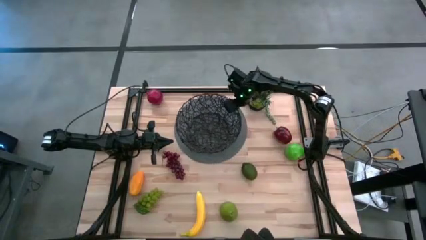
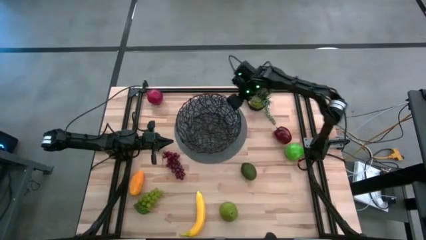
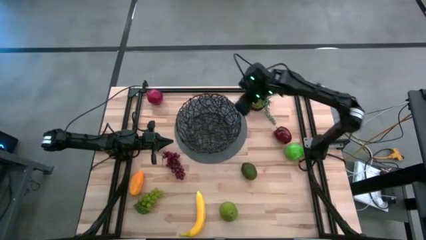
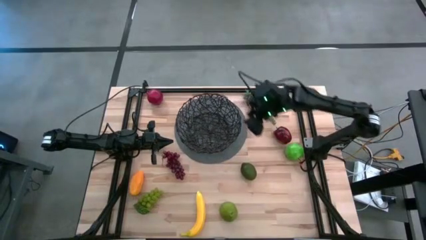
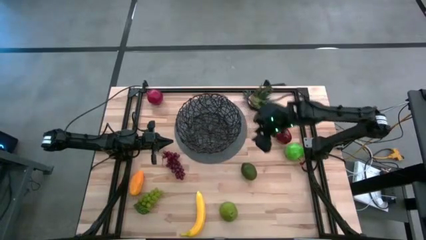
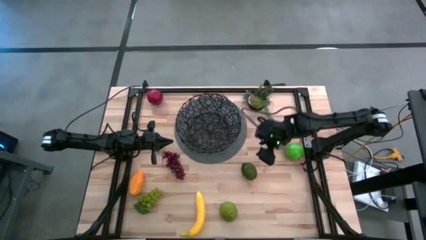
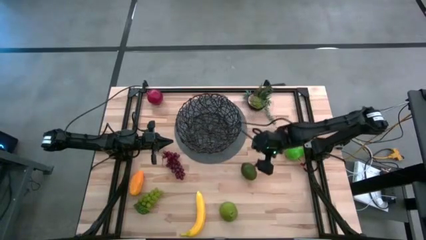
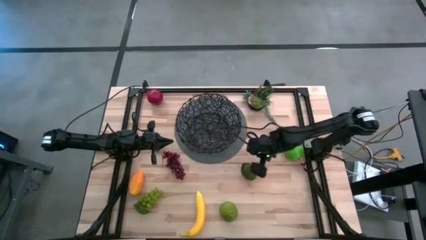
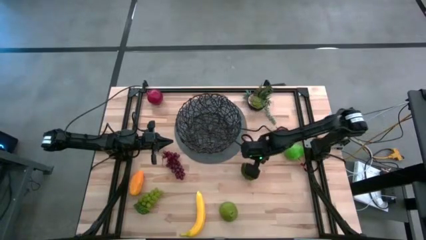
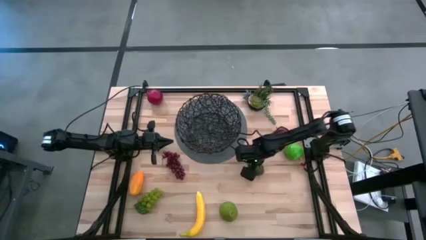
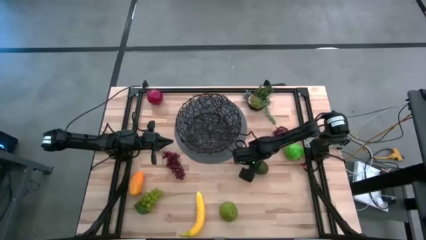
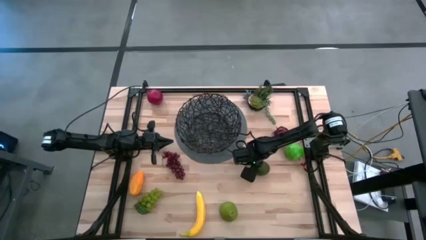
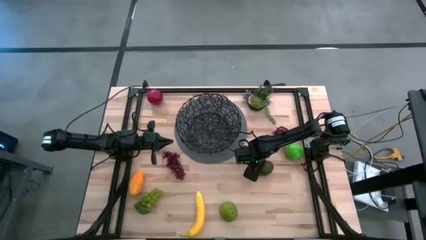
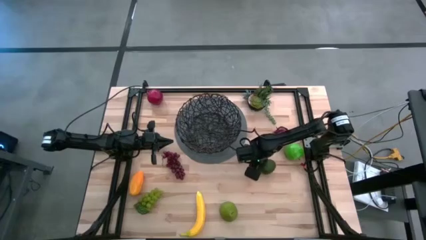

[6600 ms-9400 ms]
Task: Build produce basket
Put the green lime into the black basket

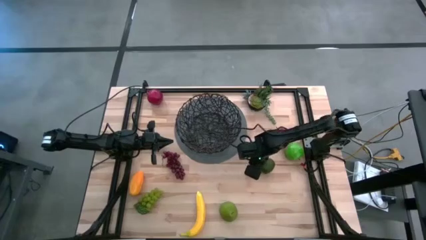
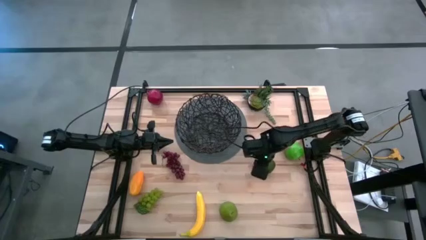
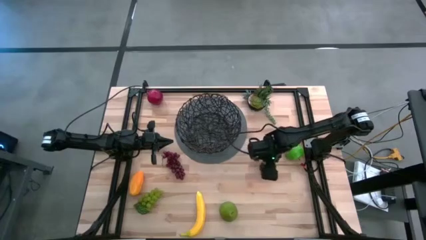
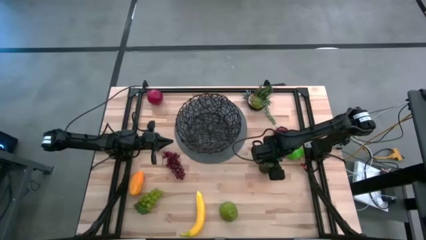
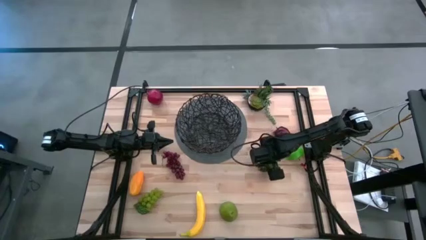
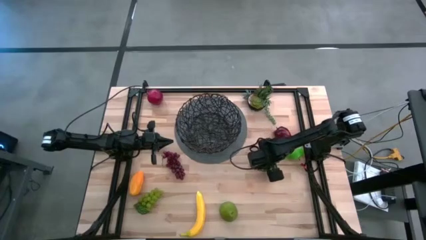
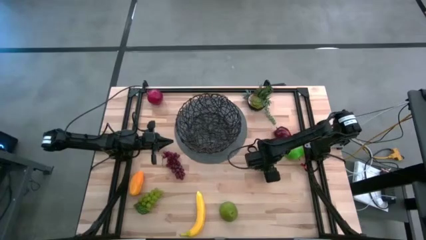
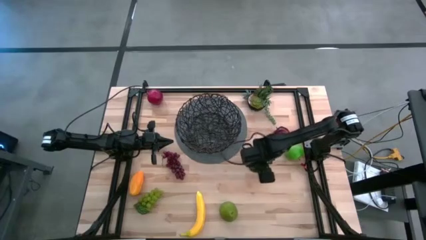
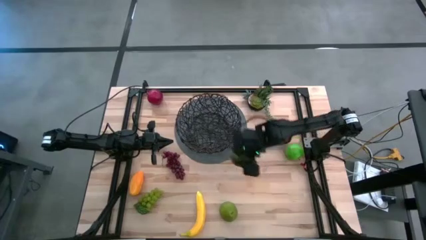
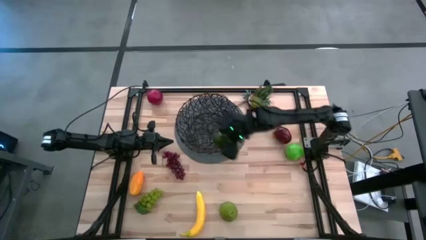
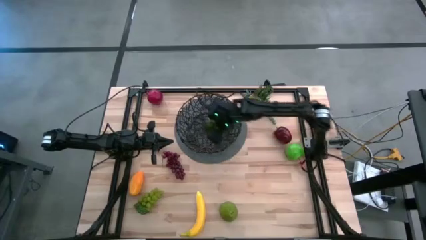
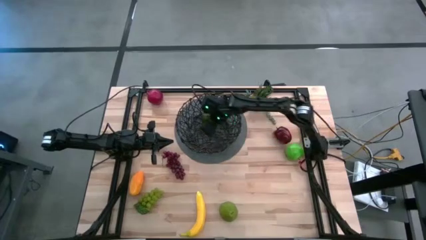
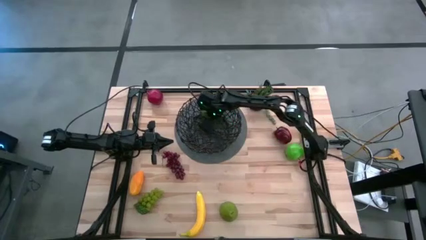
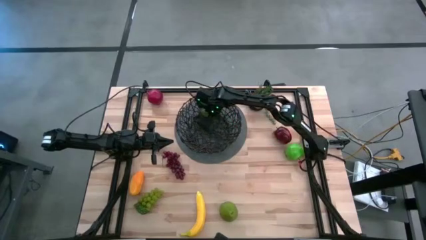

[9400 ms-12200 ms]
Put the green lime into the black basket

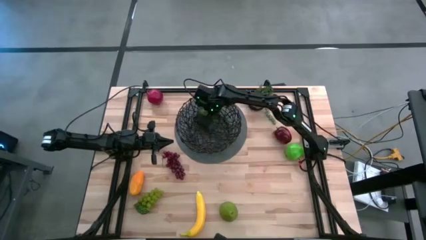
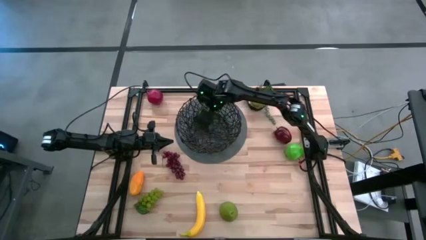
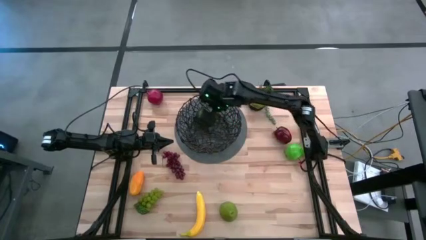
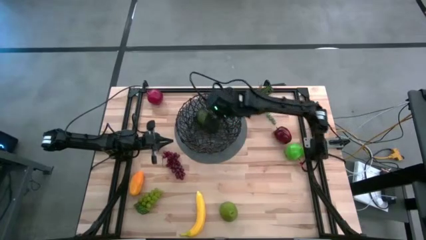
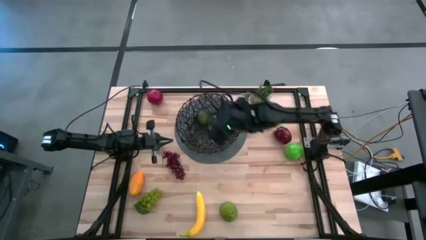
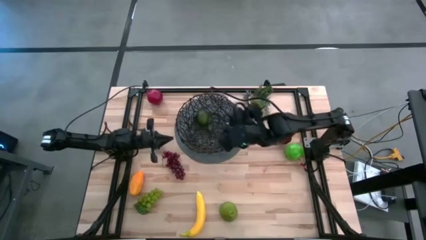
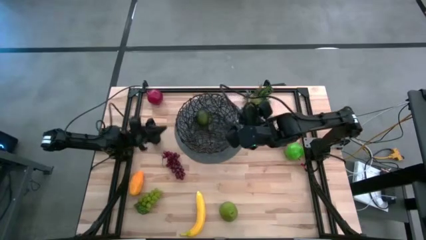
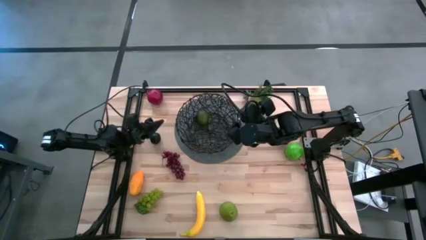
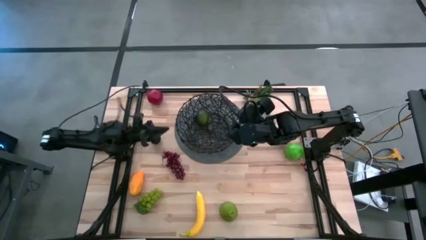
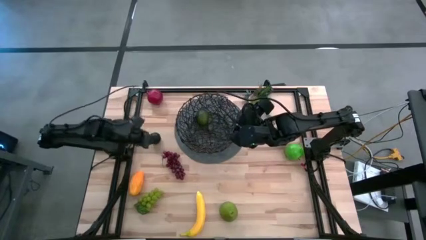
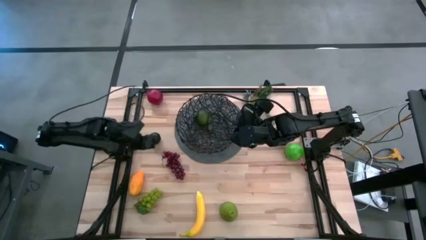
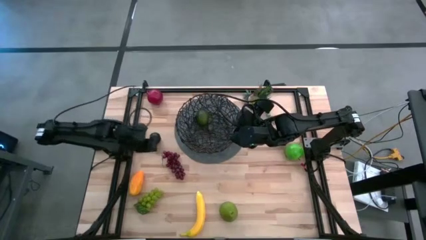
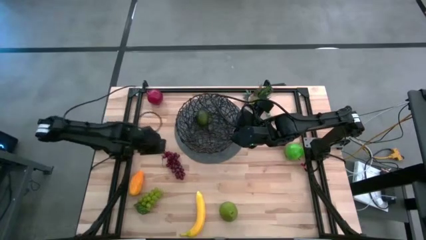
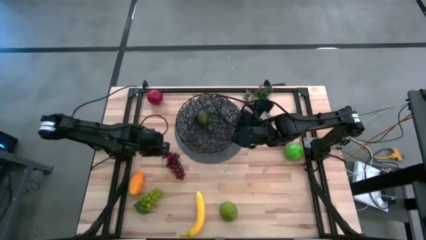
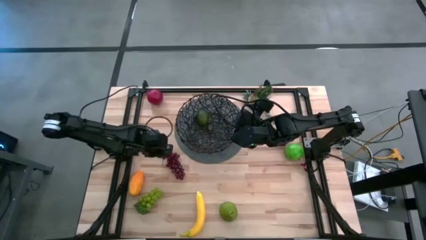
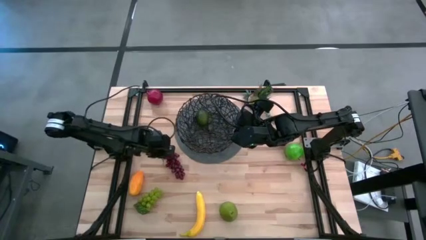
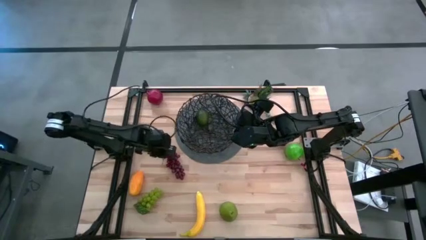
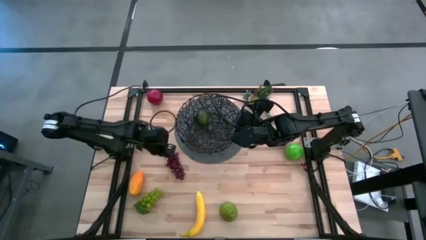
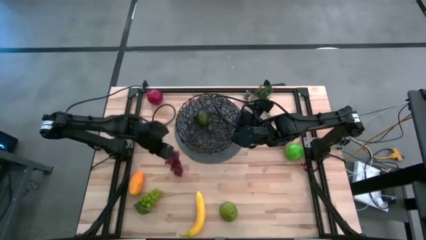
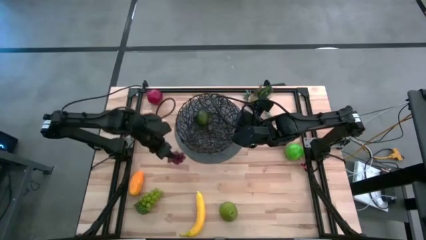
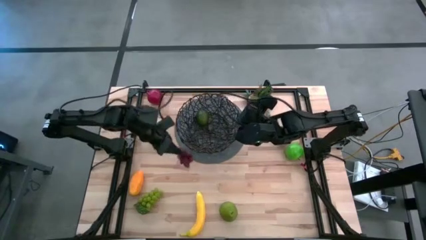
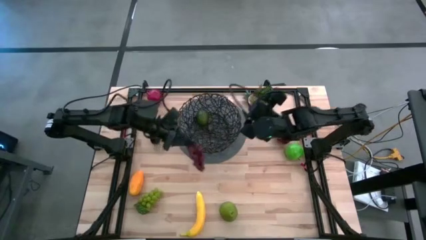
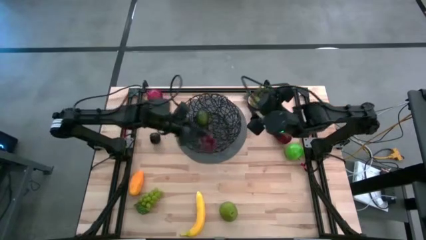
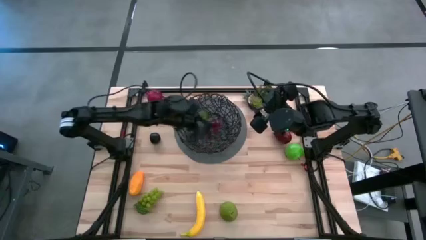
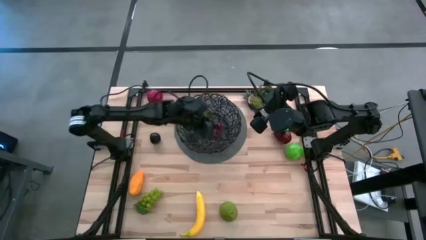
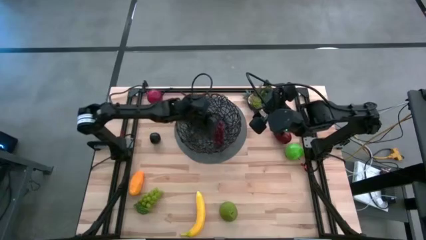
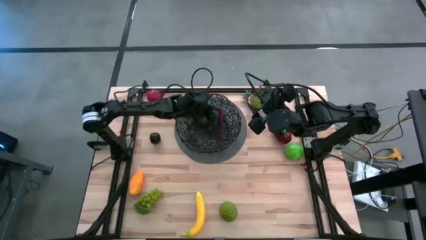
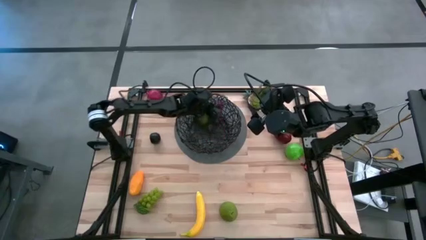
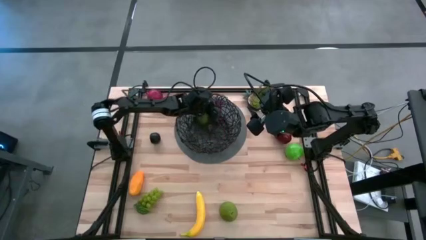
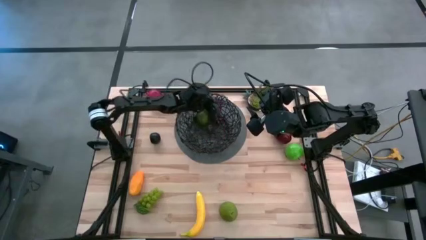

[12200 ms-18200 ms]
Put the red grapes into the black basket

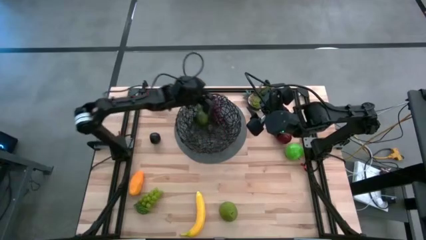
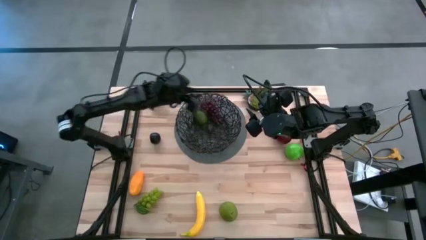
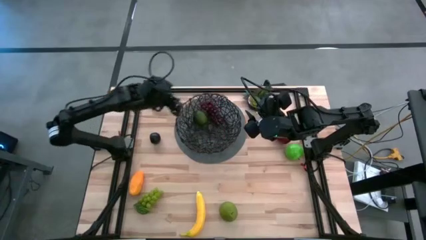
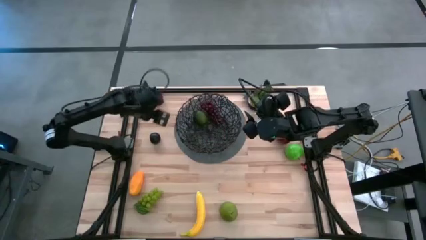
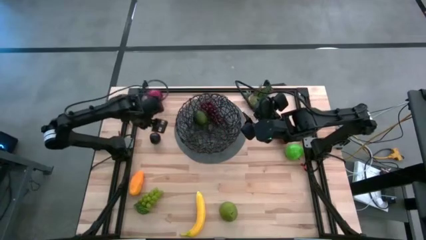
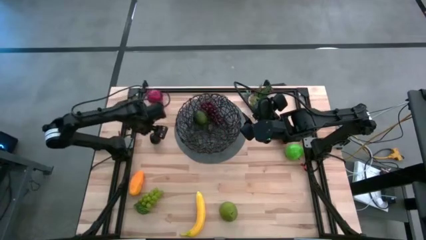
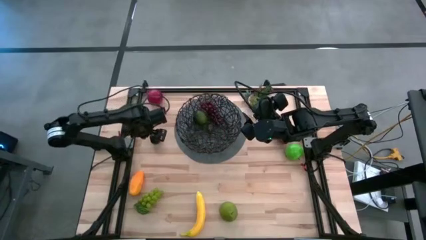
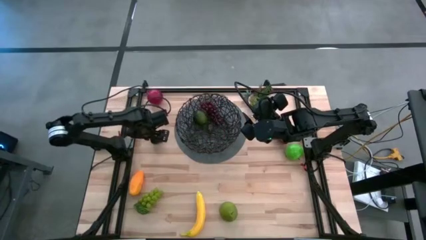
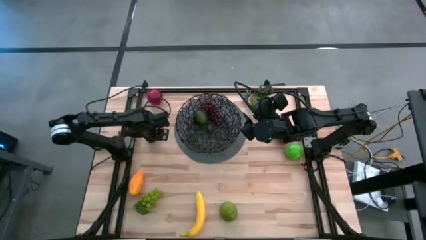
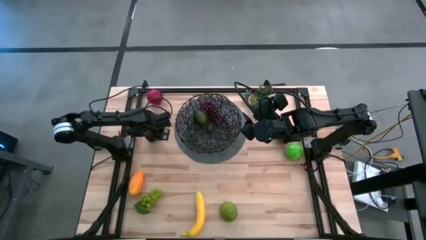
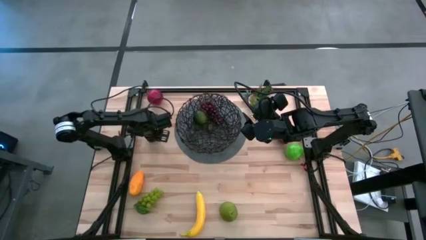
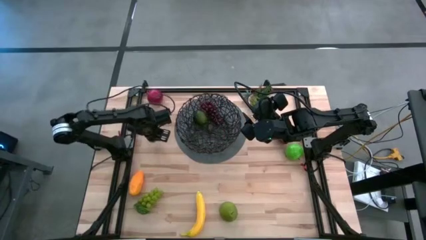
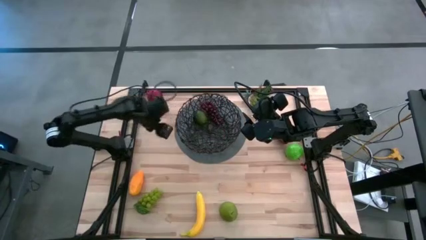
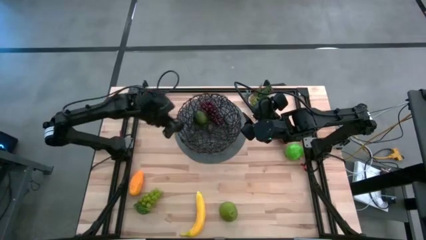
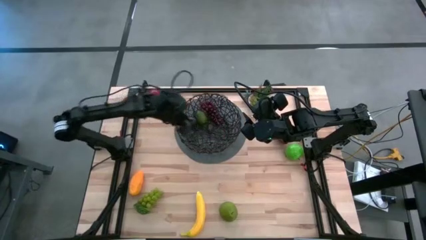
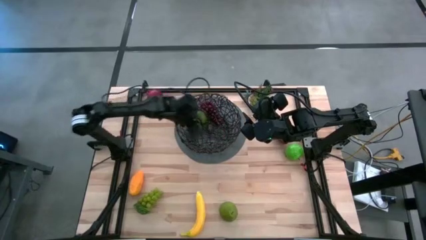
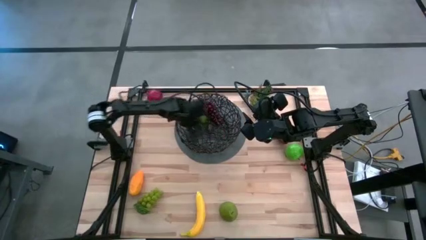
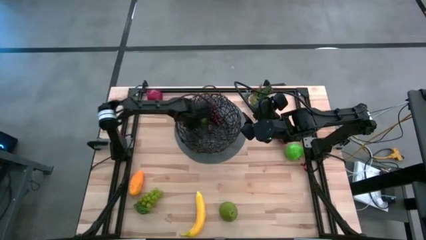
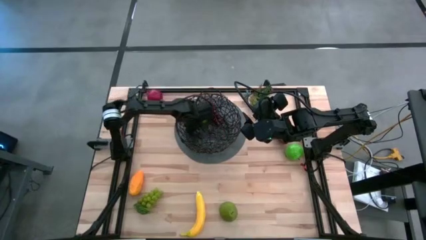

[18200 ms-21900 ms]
Put the black plum into the black basket
